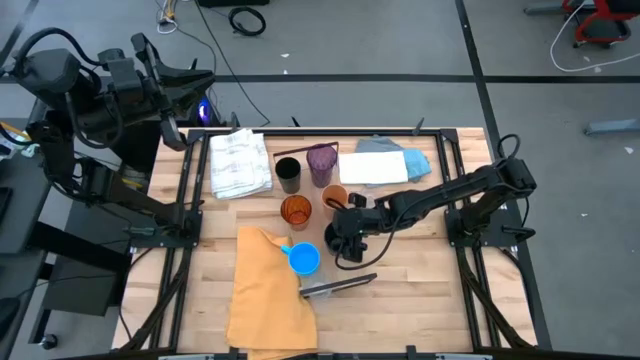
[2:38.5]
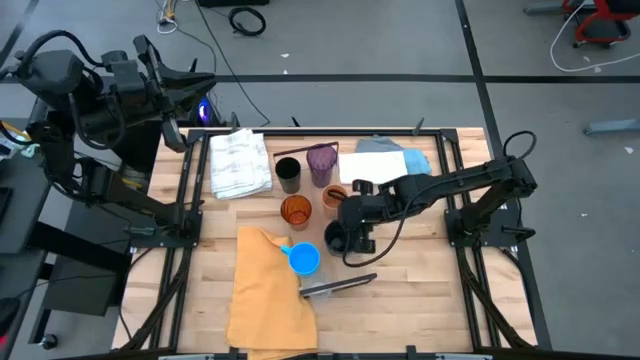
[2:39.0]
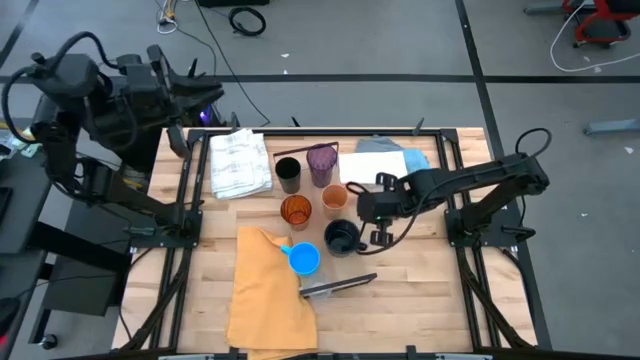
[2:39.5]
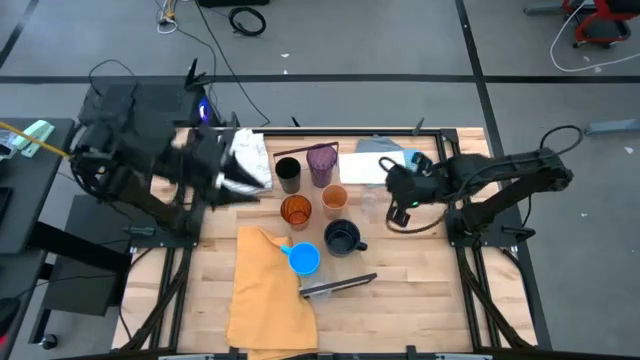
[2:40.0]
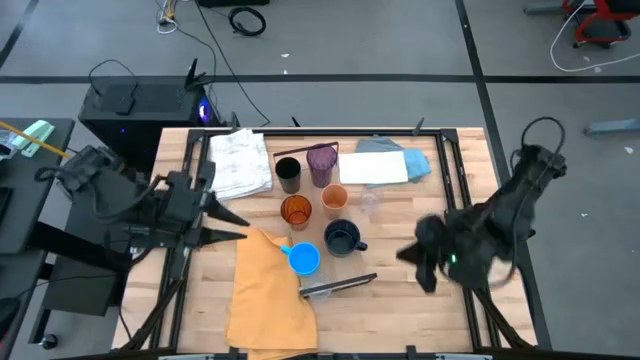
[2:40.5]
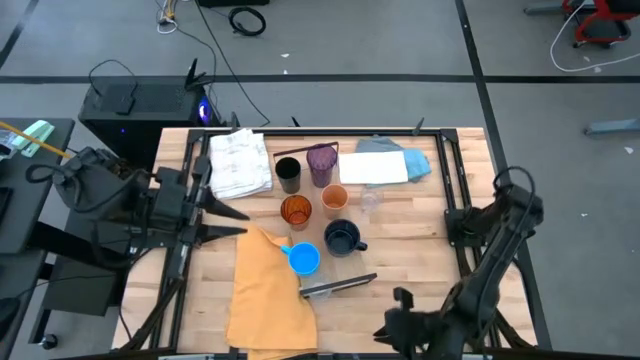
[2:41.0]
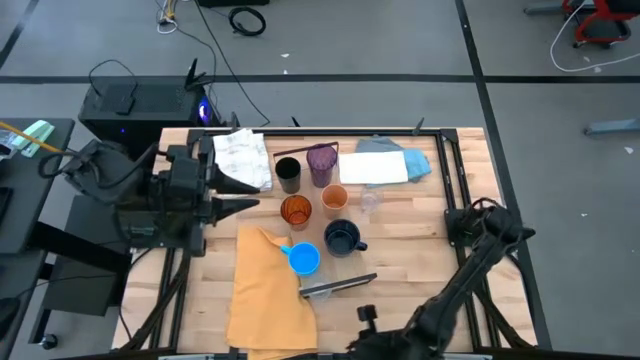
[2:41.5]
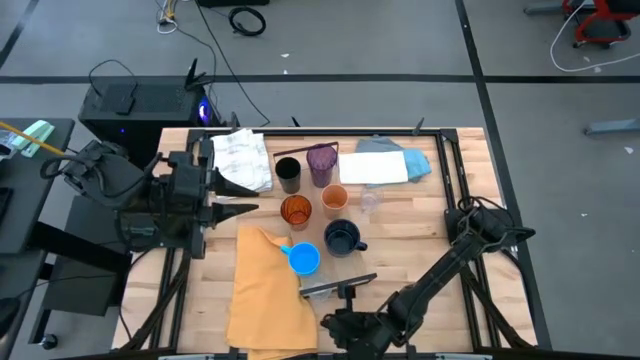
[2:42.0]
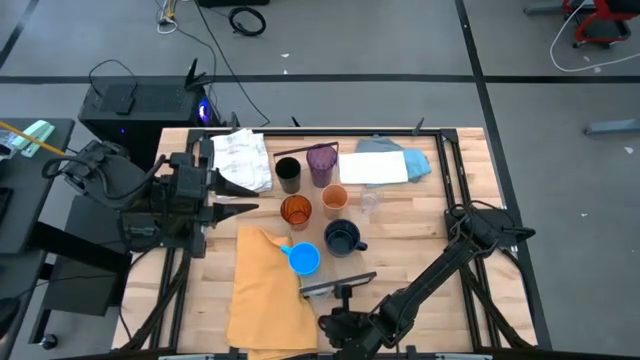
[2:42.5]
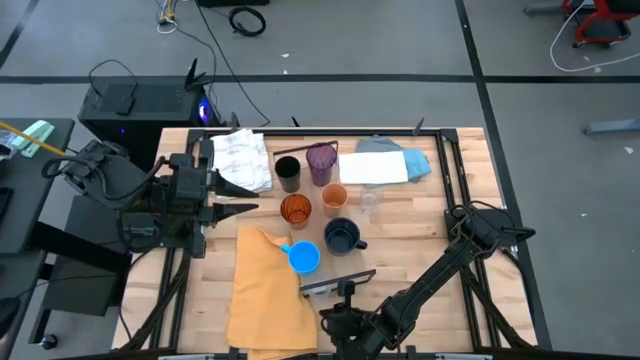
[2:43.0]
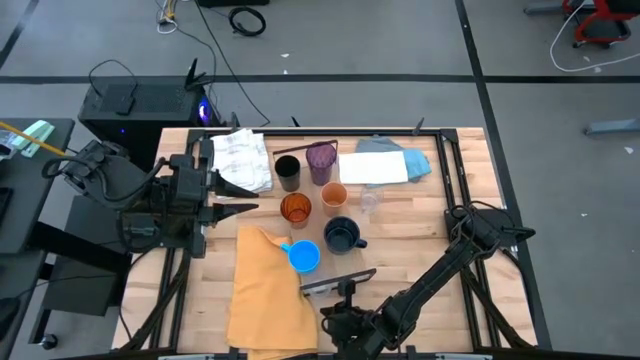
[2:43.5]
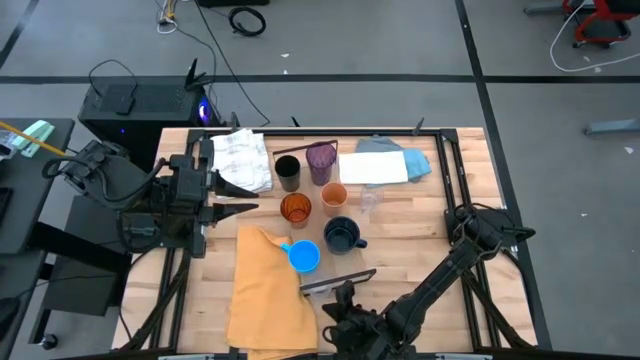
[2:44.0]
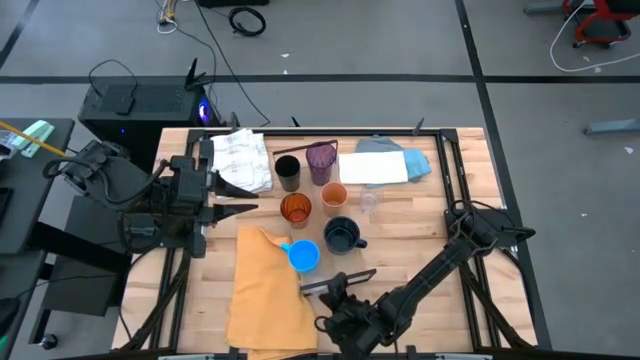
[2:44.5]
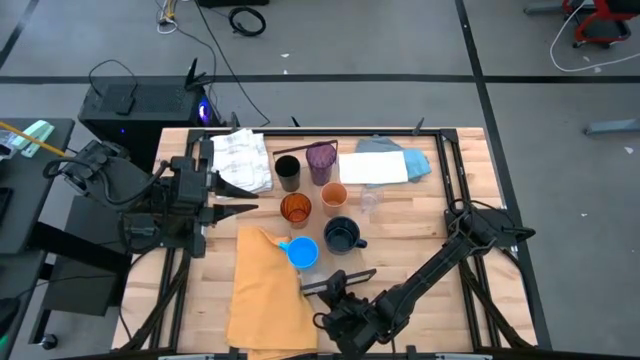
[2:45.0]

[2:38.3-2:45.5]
Task: Stack small to large cups/mugs on shelf
Adjust the transparent mug on the shelf

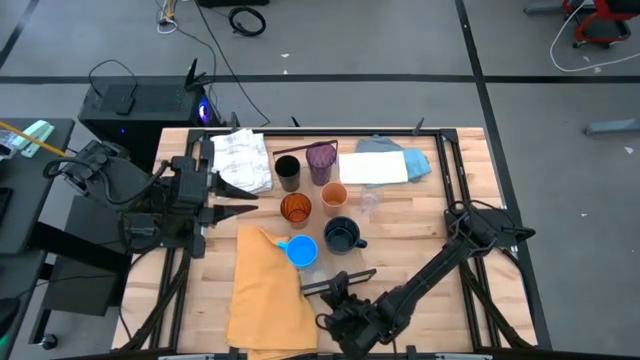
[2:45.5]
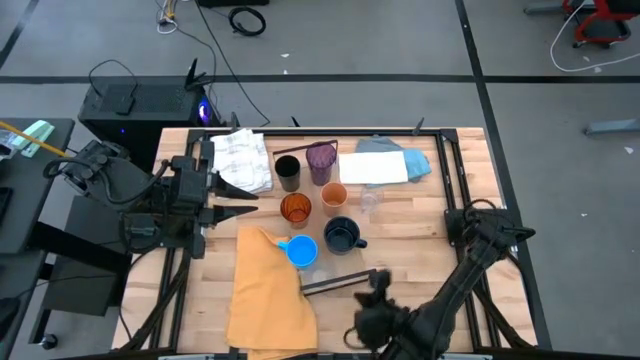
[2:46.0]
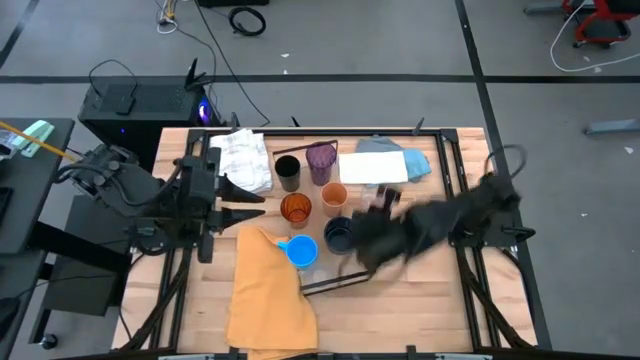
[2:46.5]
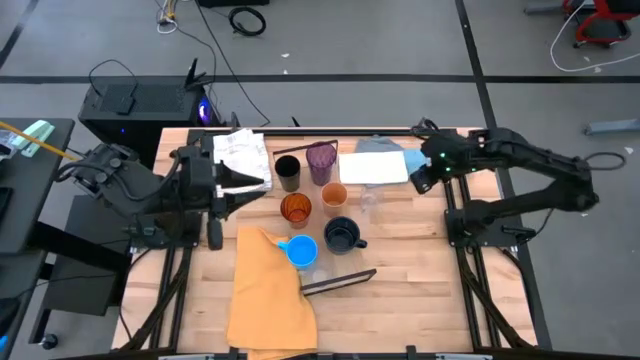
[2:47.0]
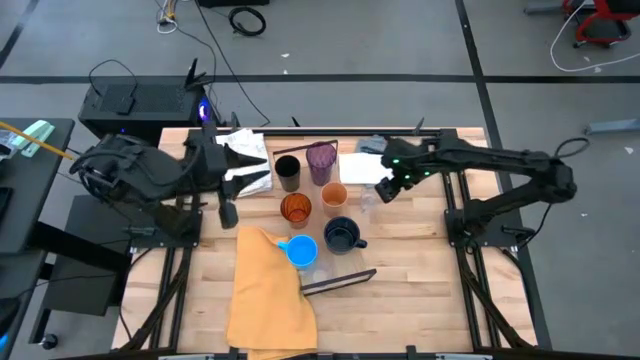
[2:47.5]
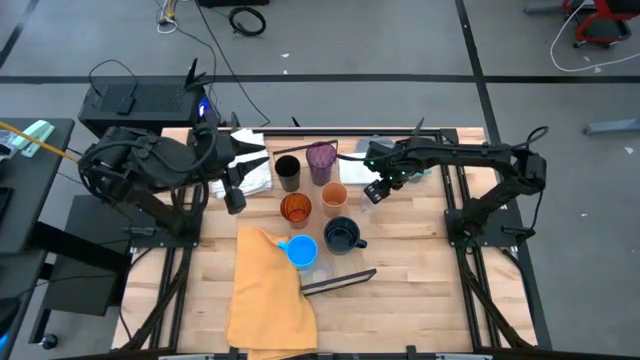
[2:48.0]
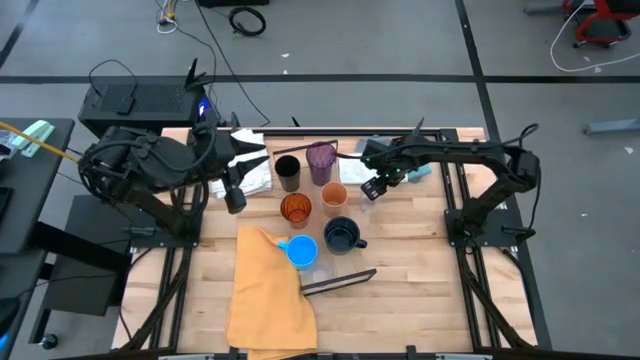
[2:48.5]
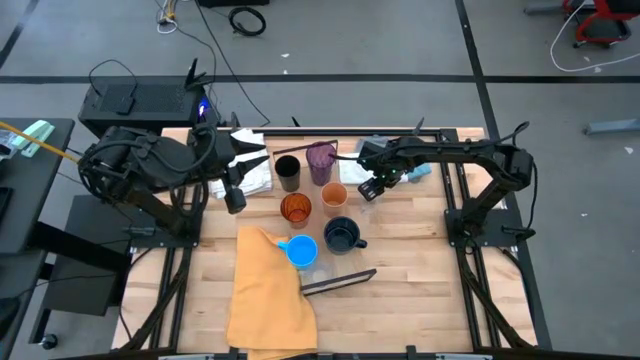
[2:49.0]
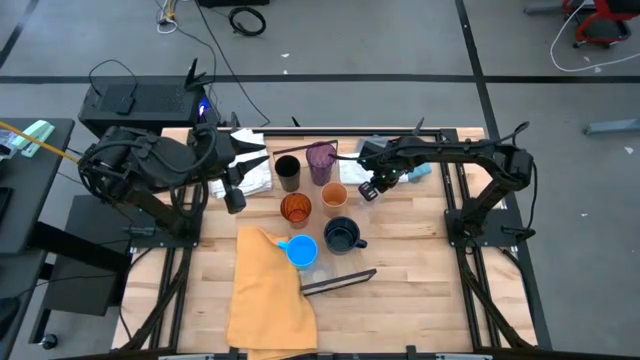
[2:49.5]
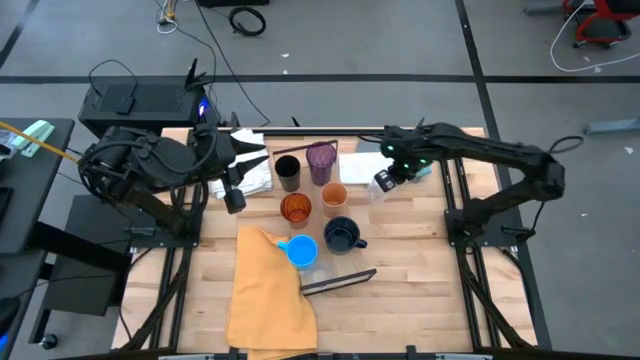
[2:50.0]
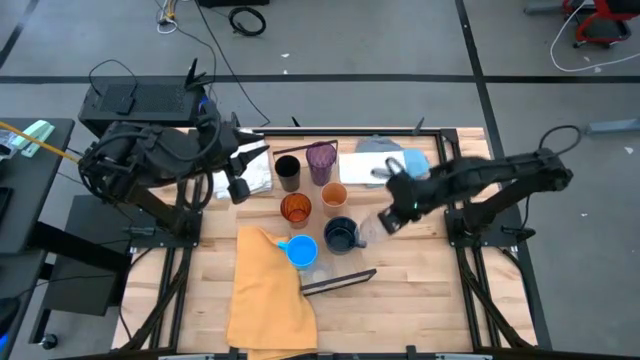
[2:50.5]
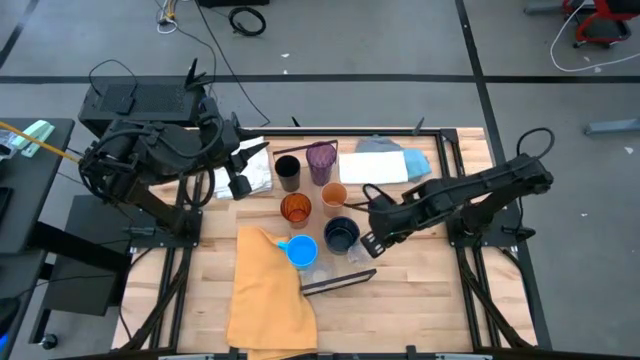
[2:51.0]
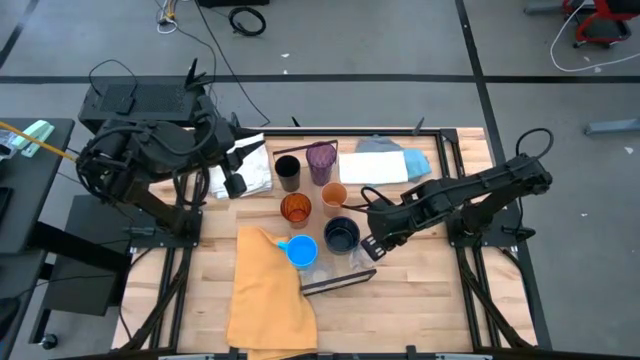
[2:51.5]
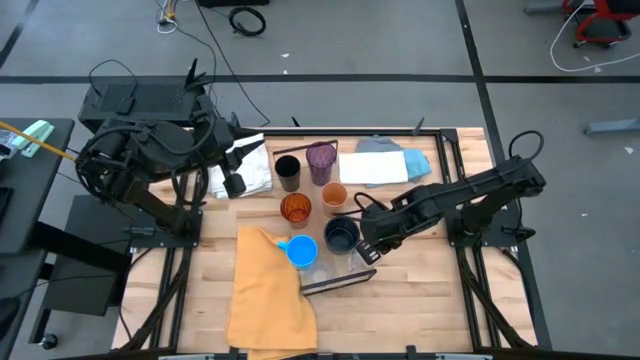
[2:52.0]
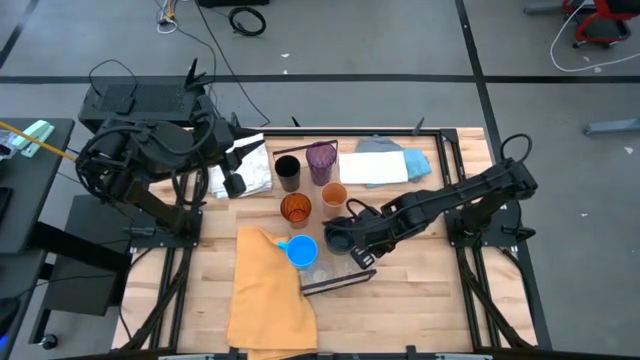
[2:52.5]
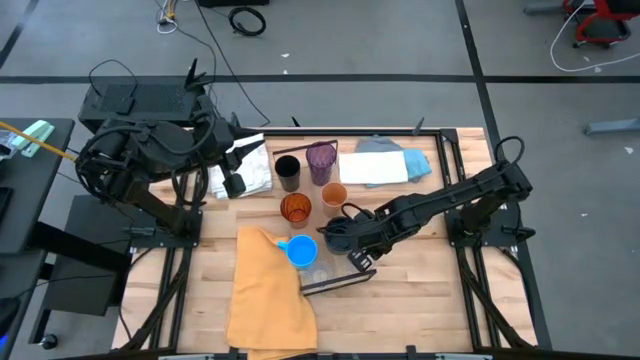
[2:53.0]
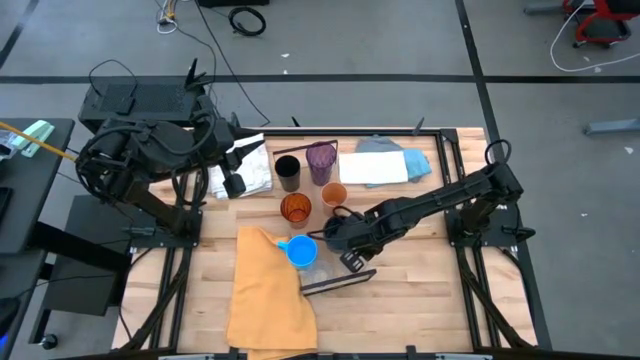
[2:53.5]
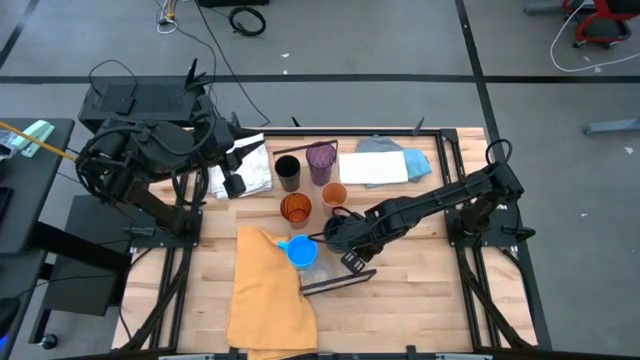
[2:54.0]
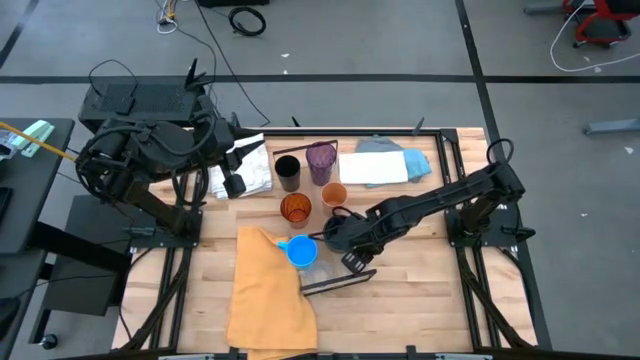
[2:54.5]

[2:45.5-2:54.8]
Put the transparent mug on the shelf

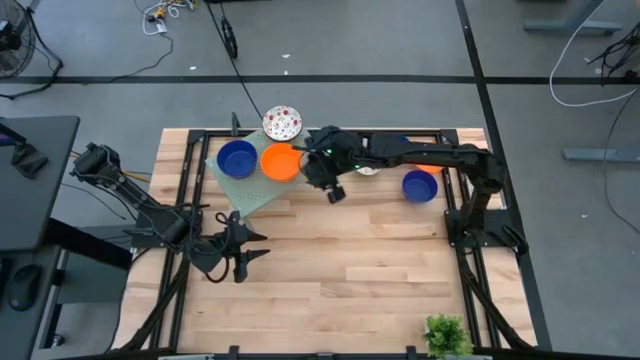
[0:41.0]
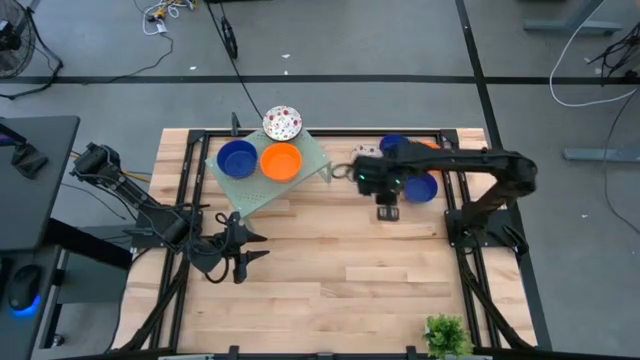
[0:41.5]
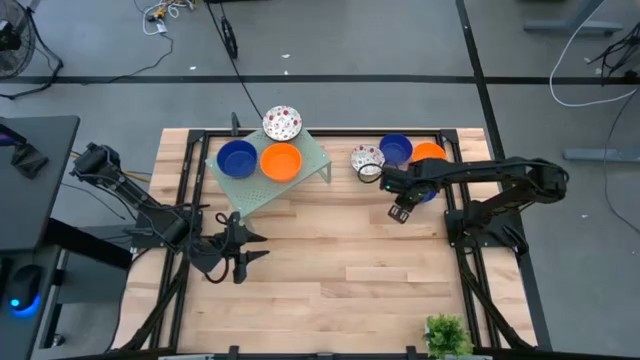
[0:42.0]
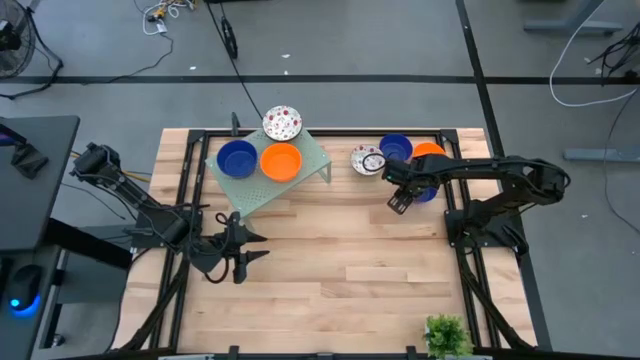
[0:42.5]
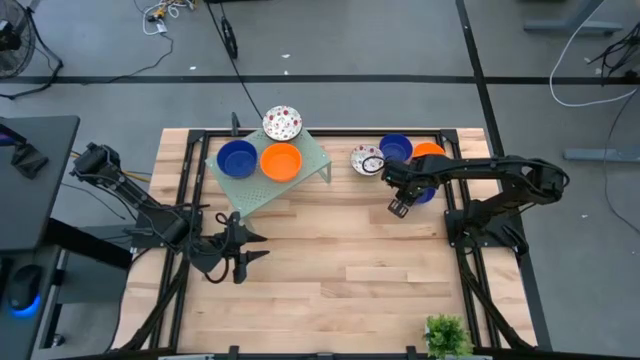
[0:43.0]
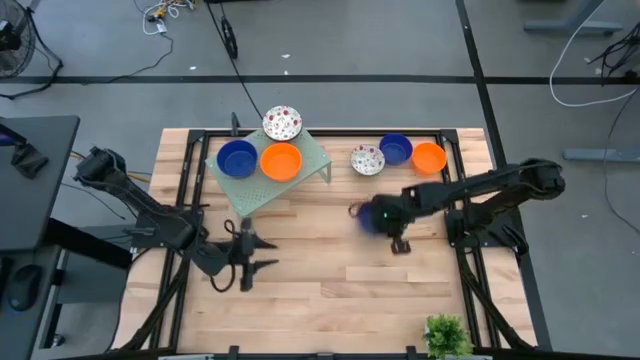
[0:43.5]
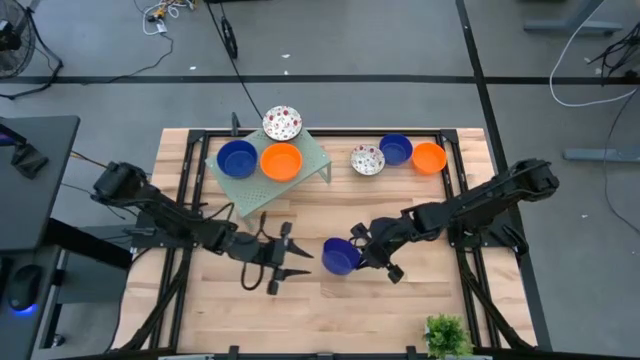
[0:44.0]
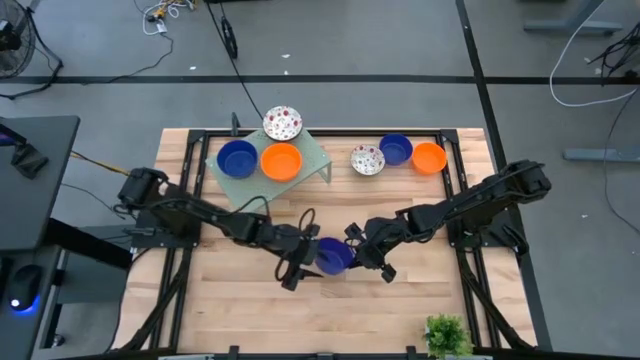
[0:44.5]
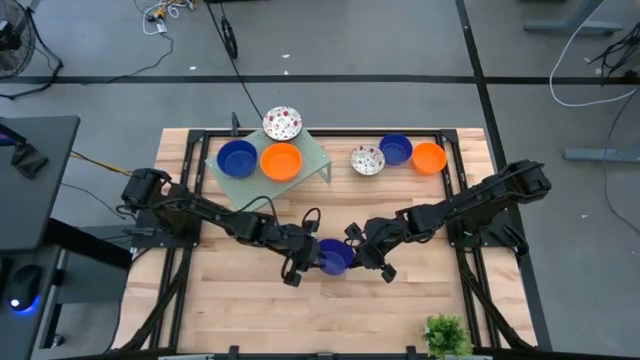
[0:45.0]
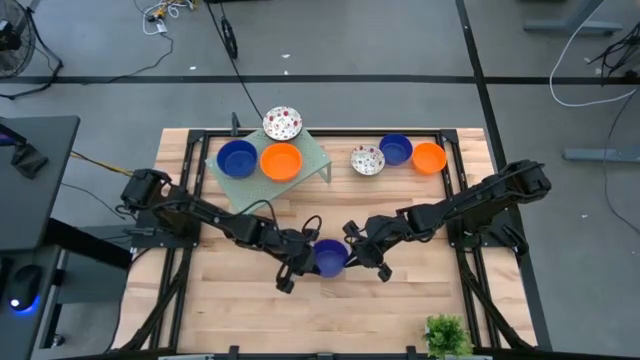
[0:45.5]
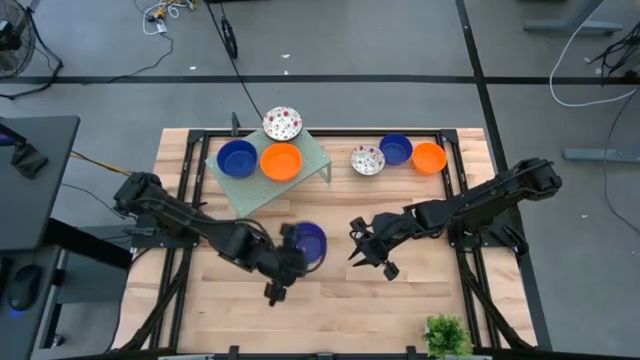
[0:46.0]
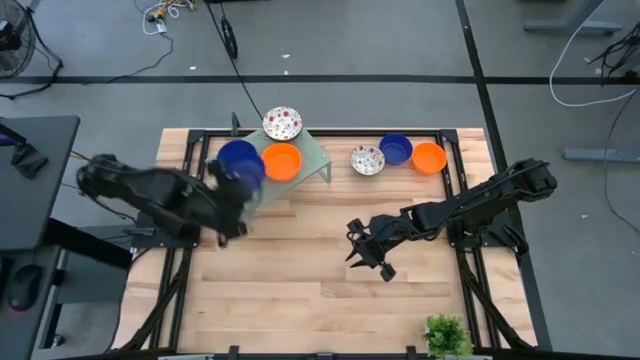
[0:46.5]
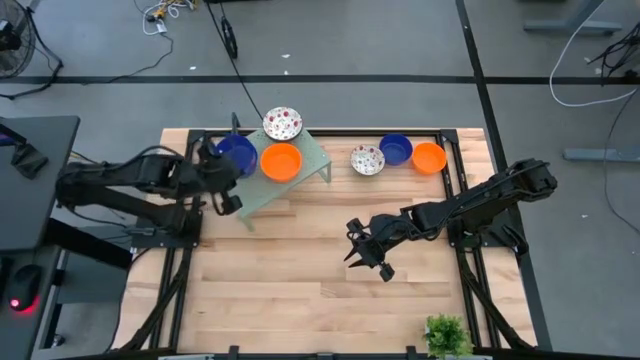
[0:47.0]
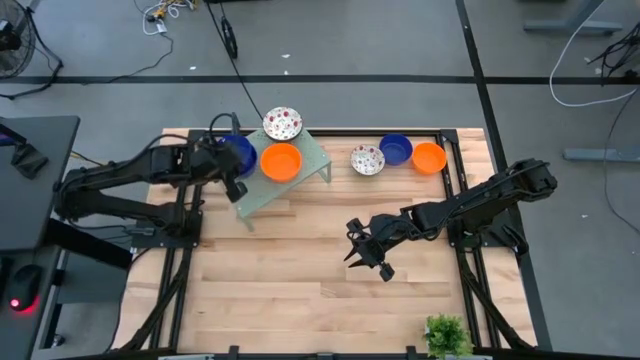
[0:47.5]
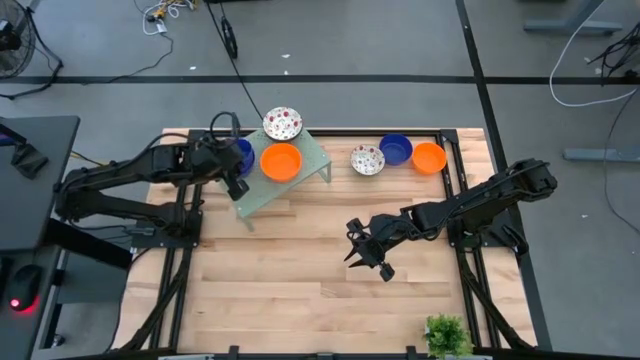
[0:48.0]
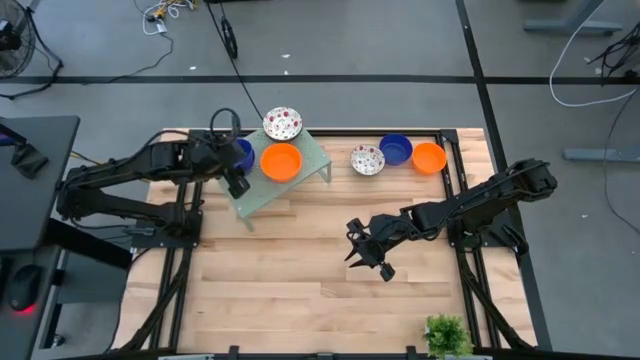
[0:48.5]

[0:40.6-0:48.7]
Task: Pick & Place Mini bowls
Stack the blue bowl on the blue bowls on the shelf
